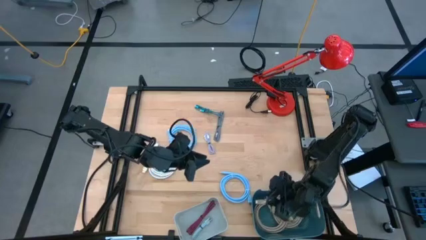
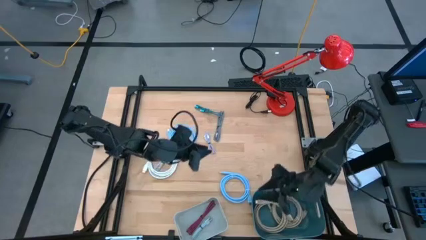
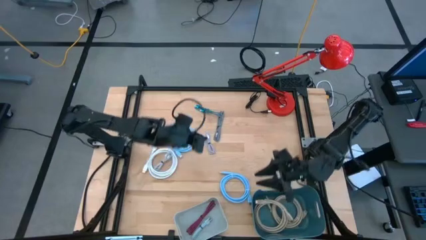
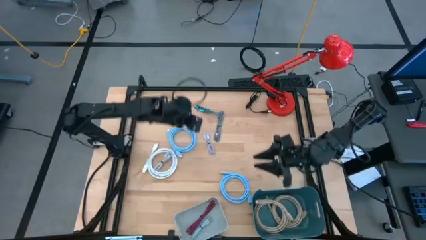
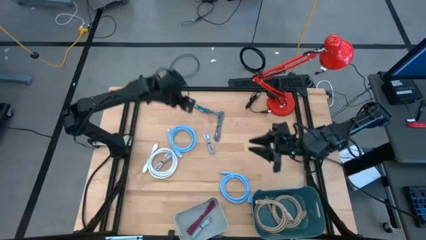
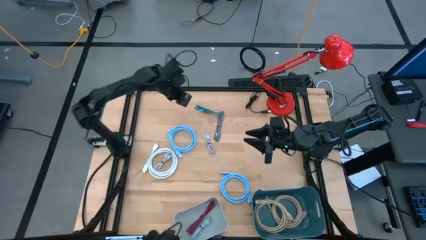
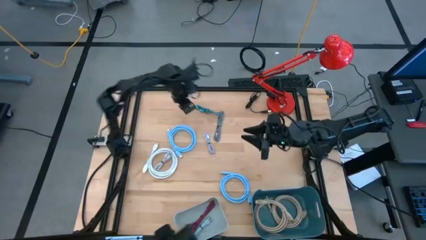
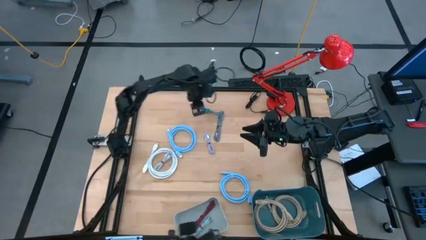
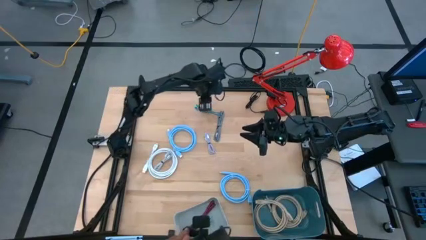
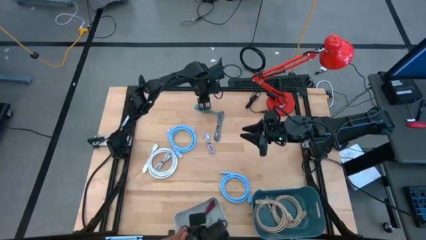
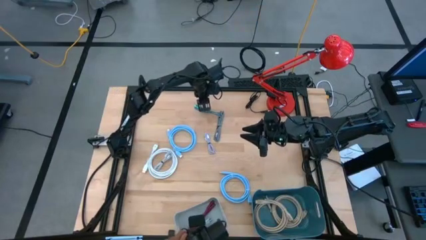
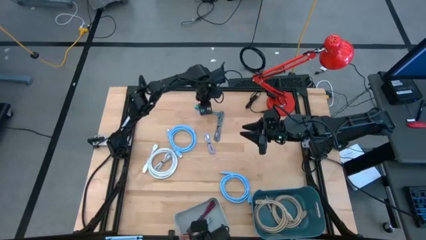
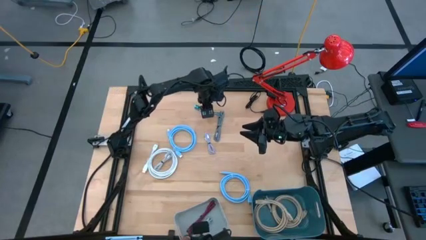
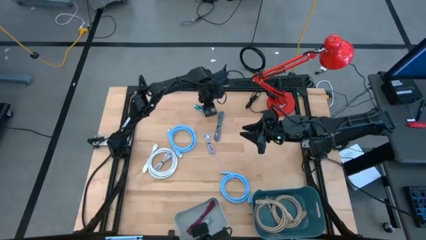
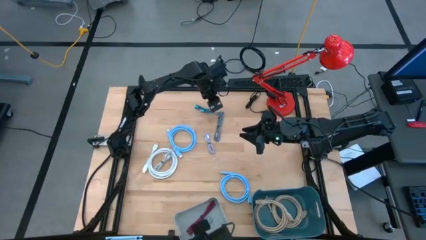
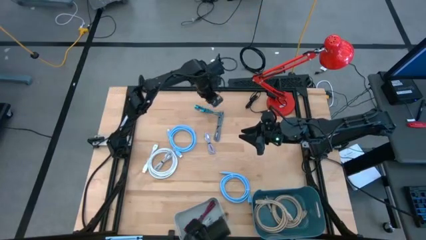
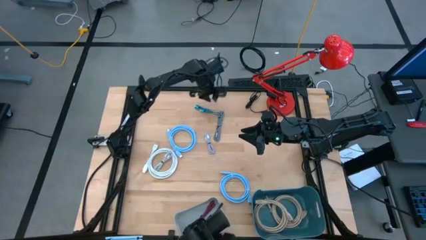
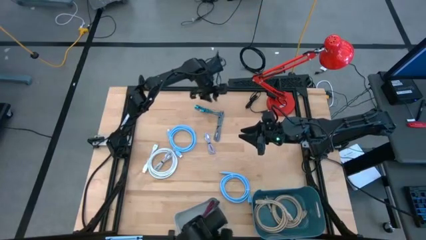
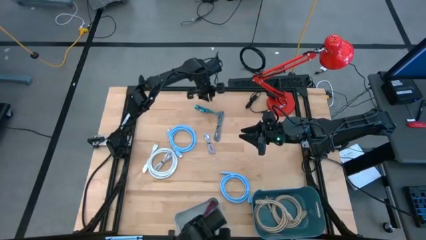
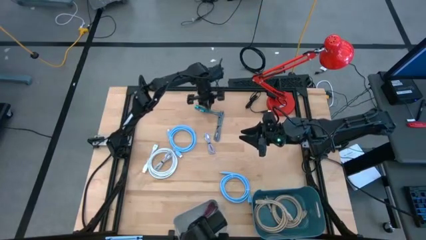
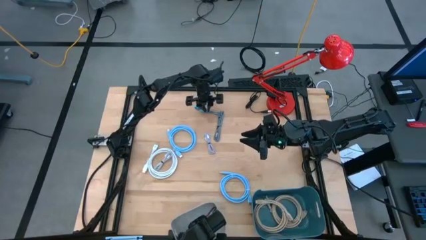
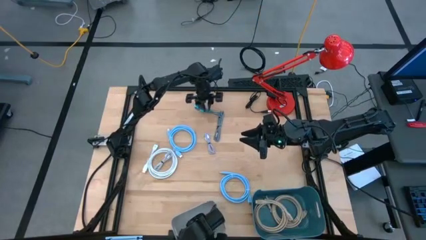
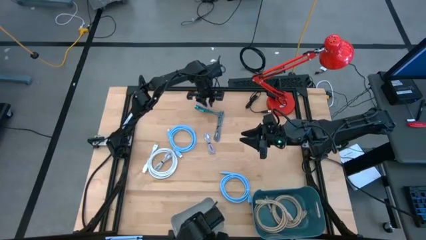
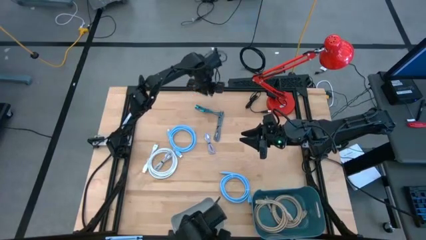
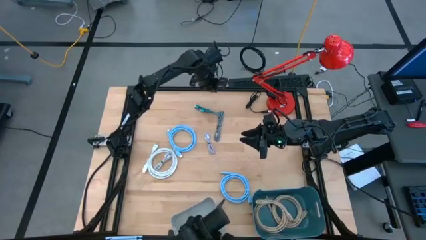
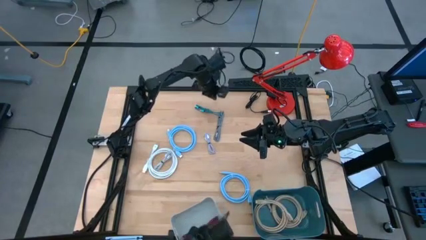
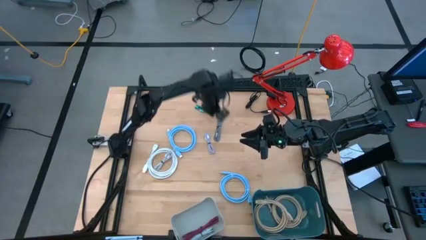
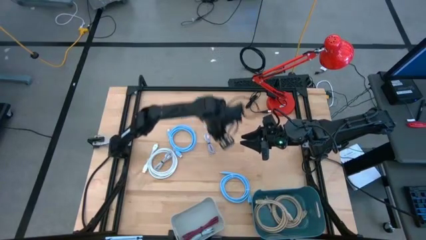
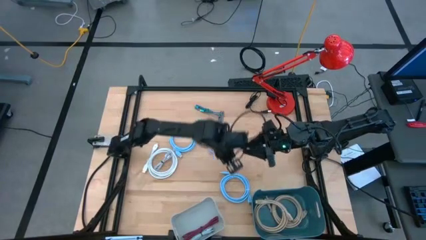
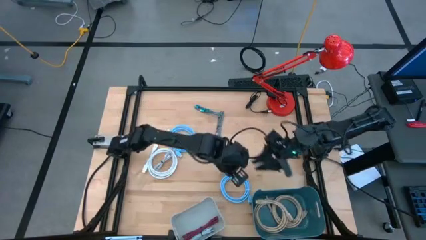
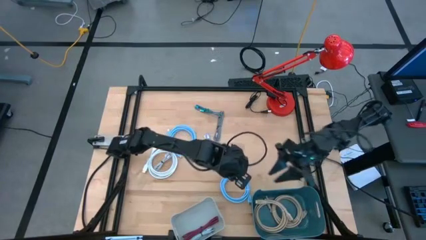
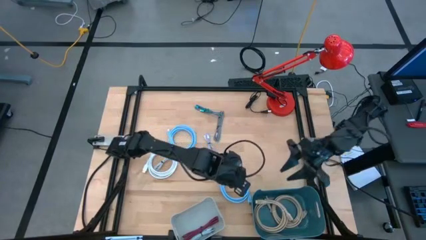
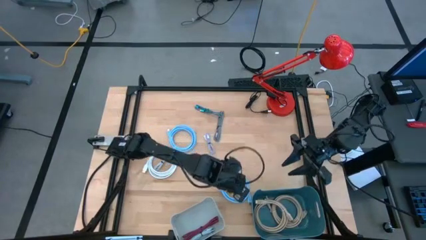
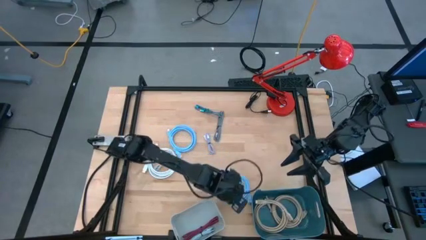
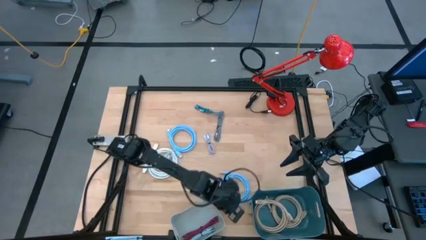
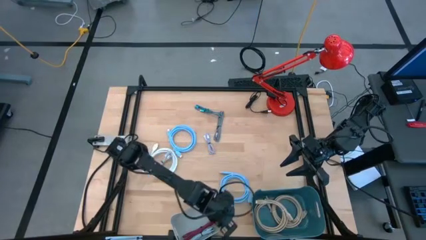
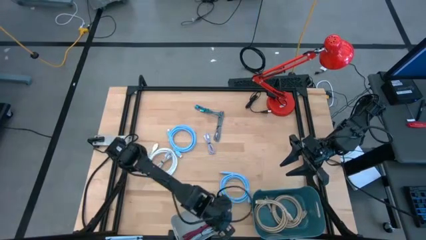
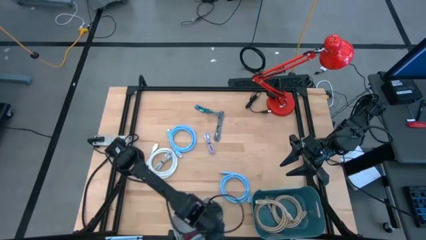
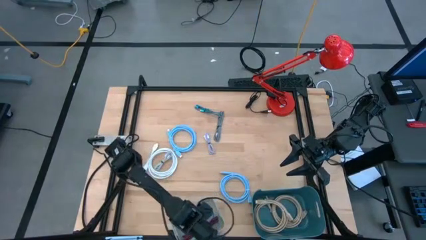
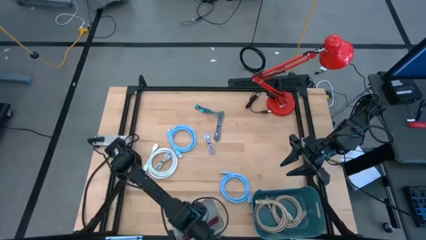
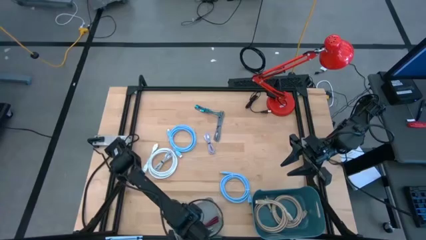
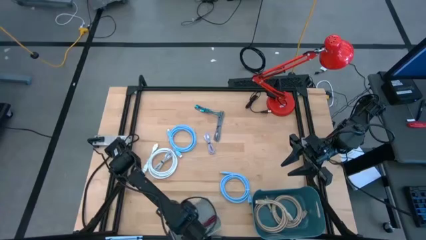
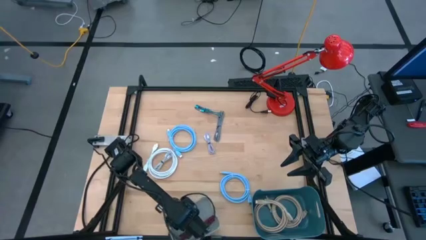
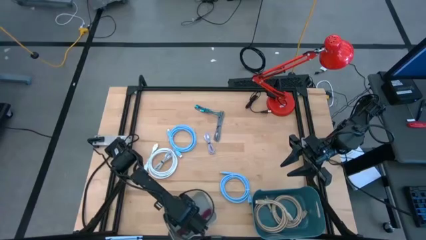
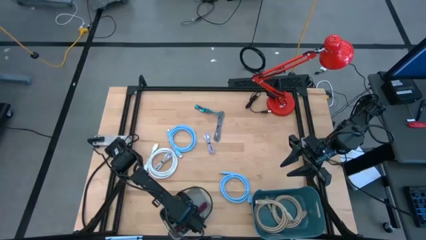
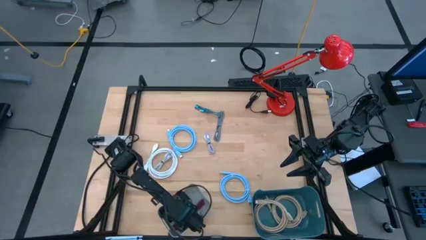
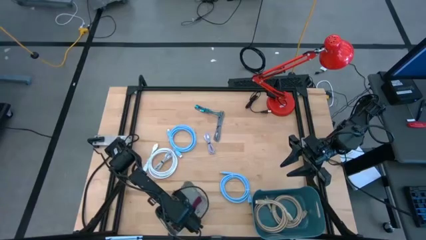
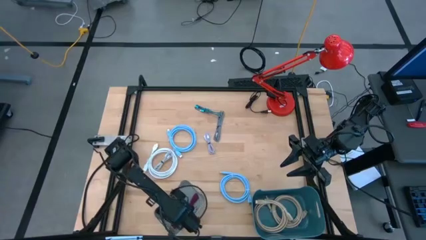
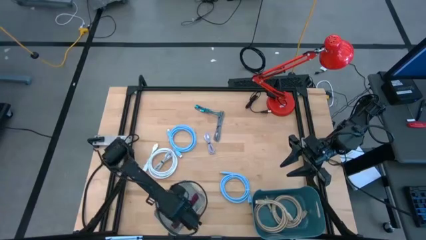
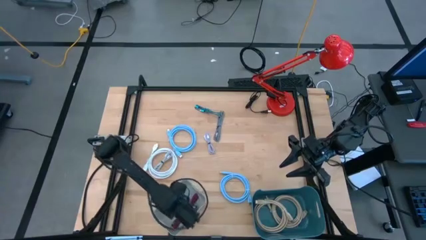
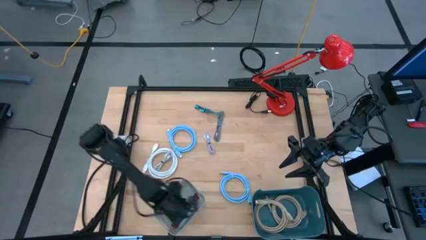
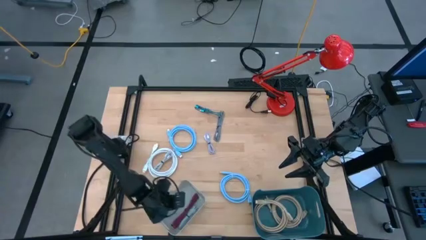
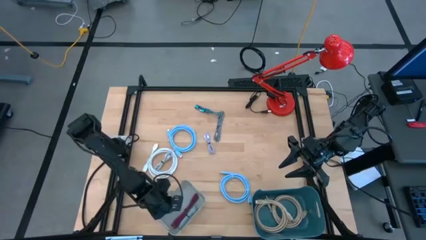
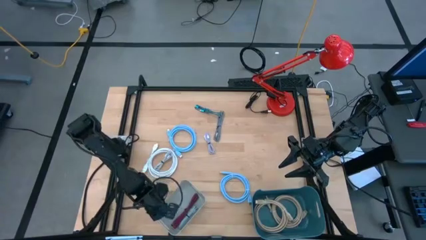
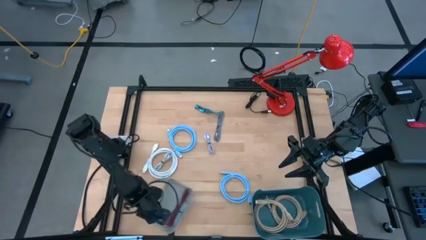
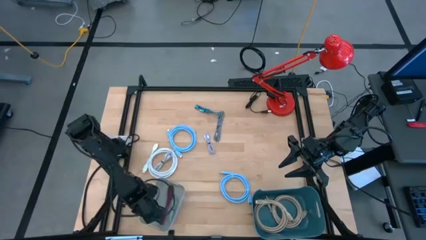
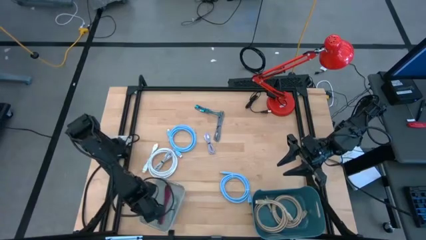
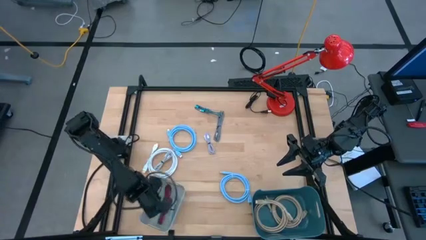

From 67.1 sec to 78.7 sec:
Task: Pick & Place USB Port
Adjust the gray bin

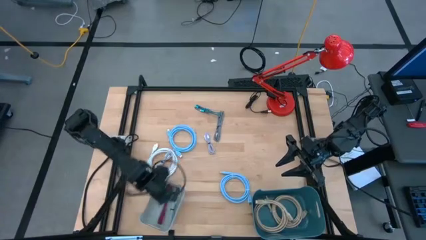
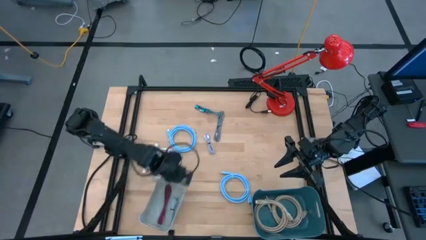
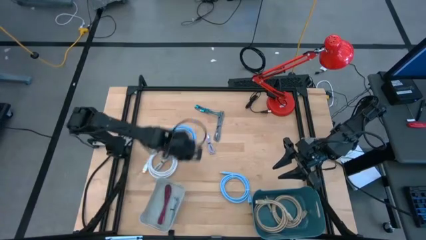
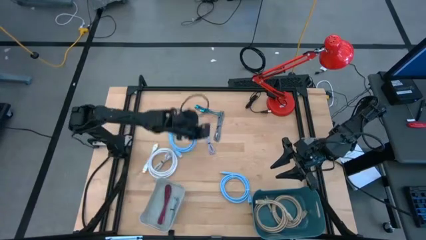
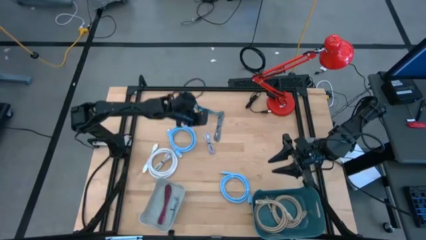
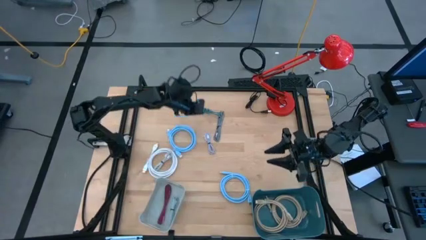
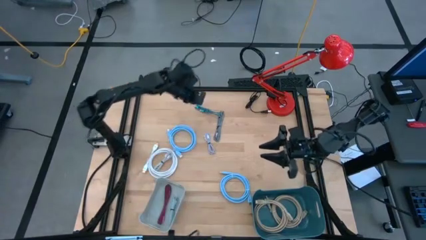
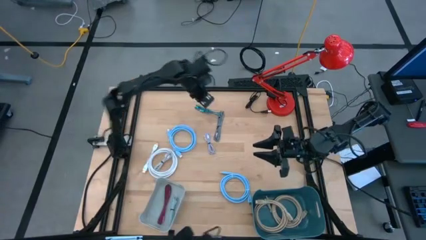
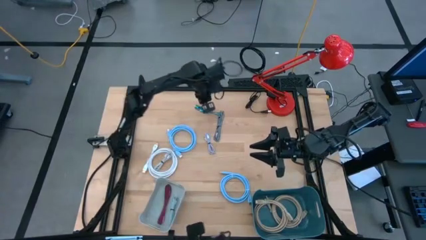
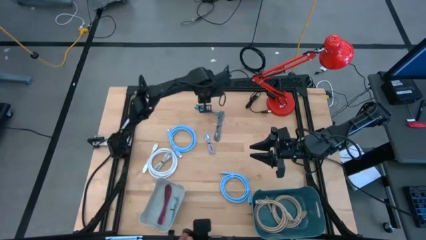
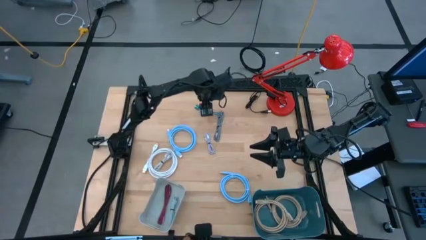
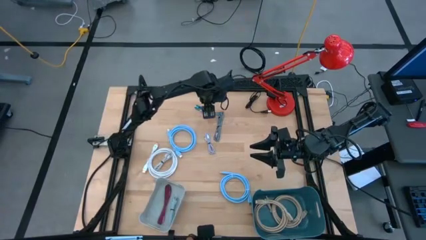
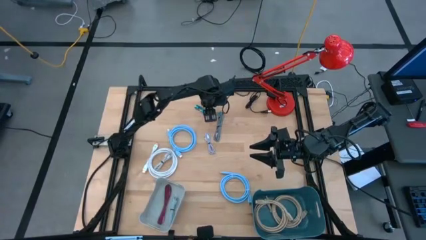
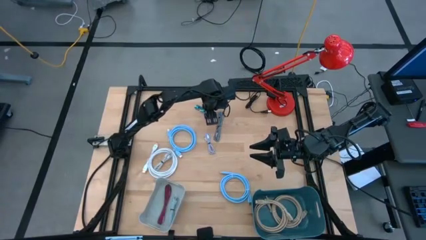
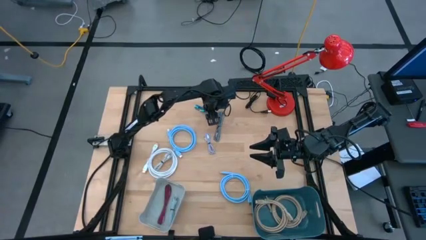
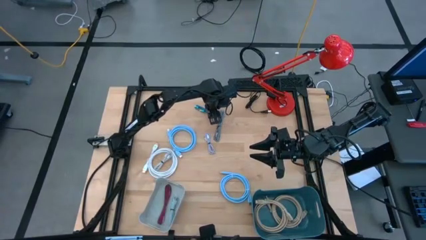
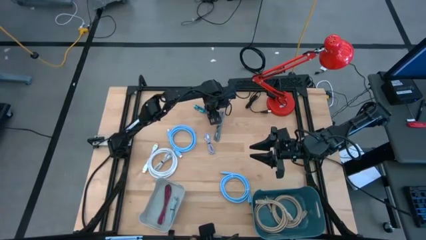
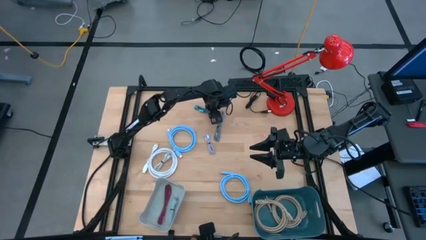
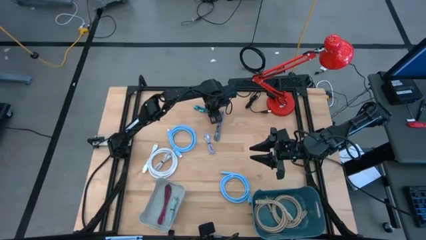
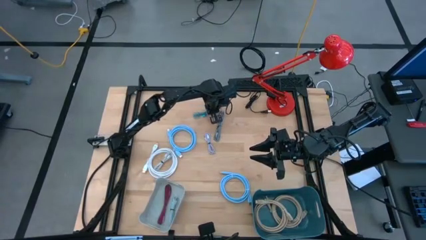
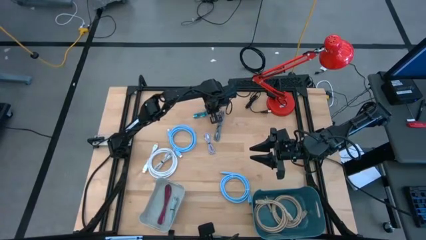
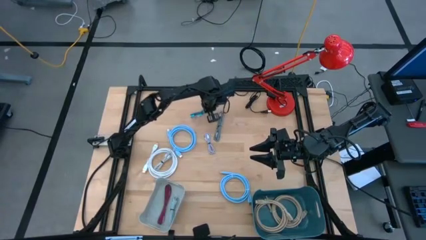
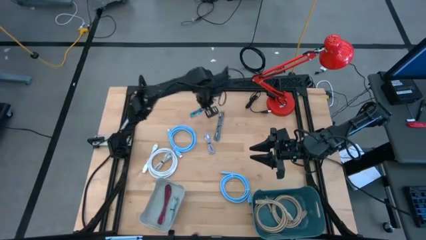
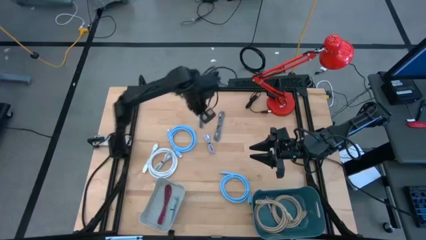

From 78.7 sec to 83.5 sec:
Put the blue patterned charger cable into the gray bin
